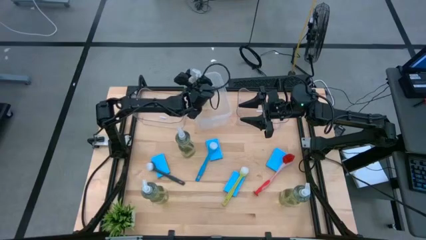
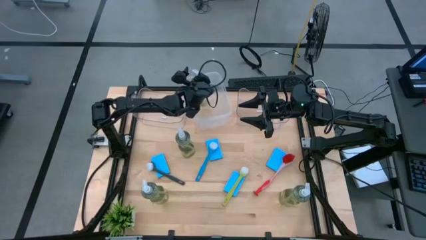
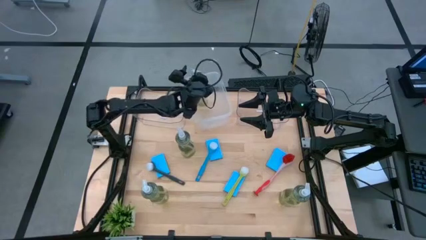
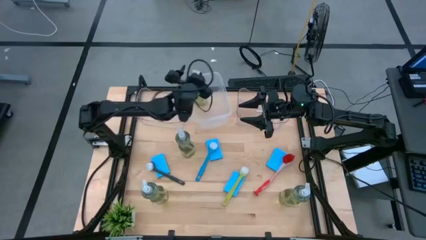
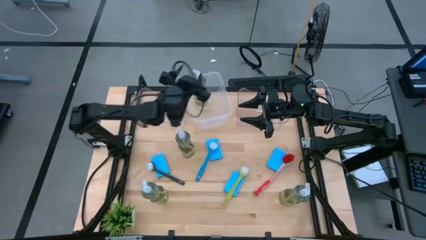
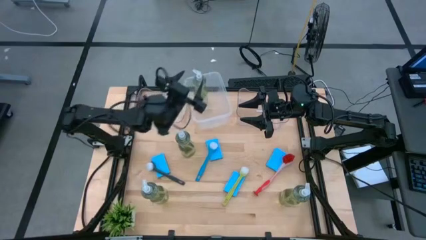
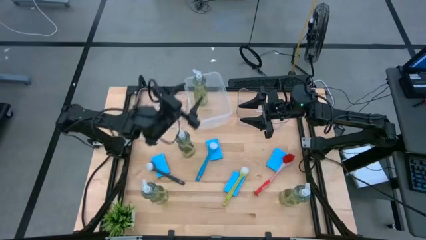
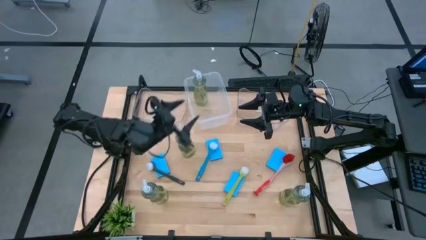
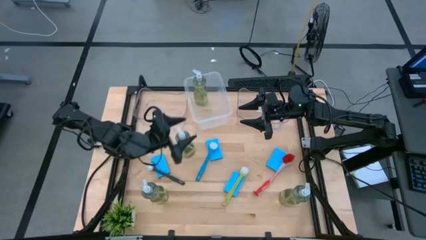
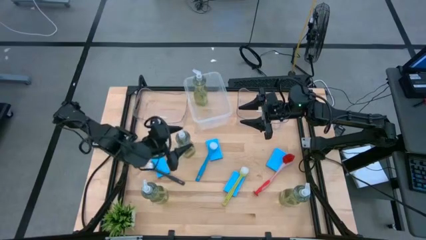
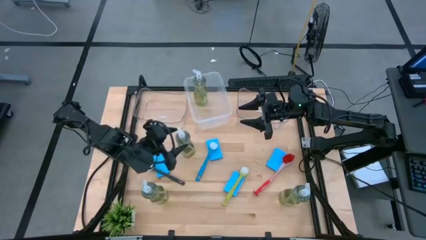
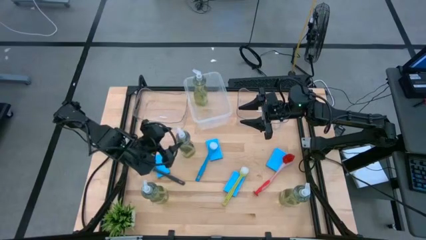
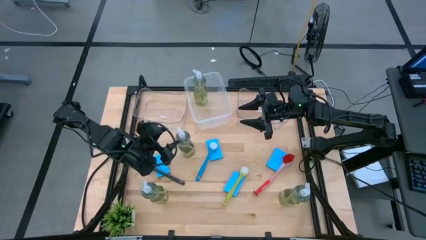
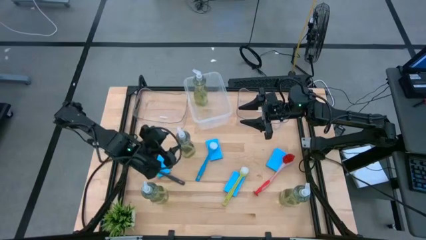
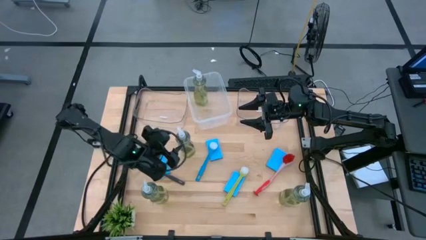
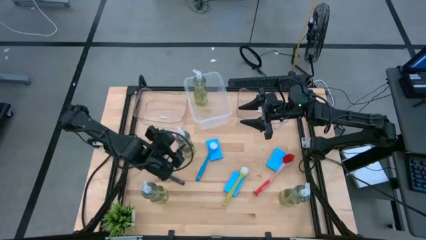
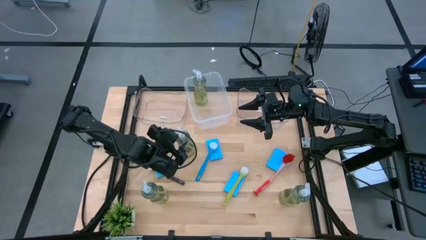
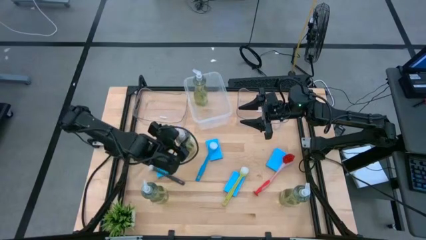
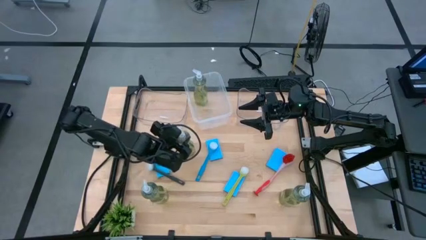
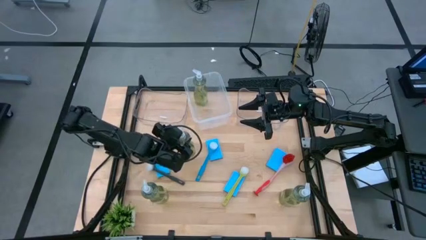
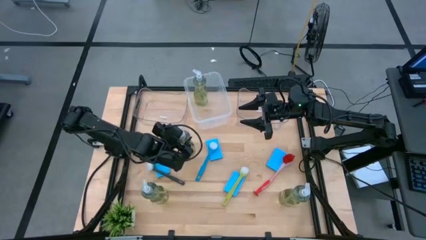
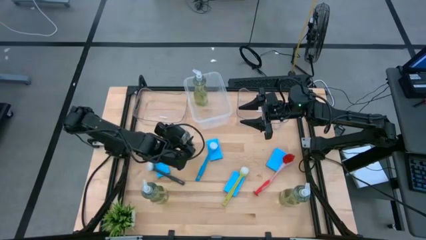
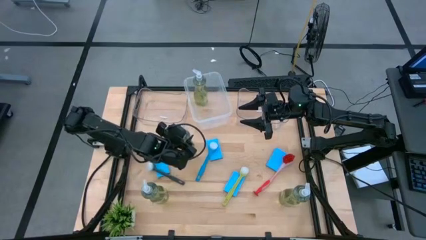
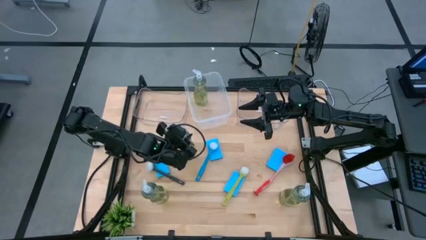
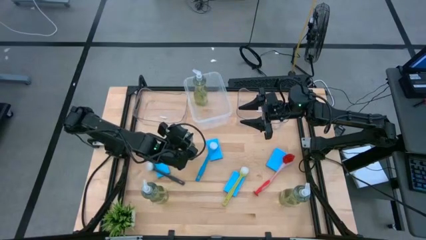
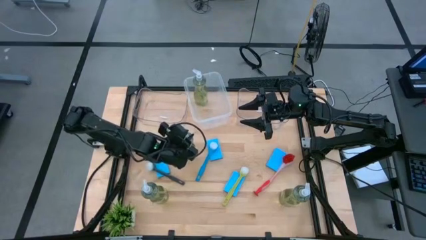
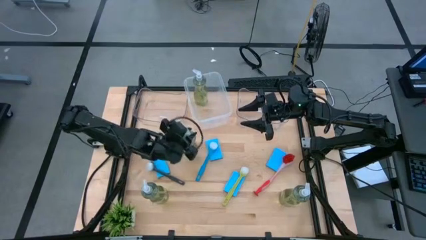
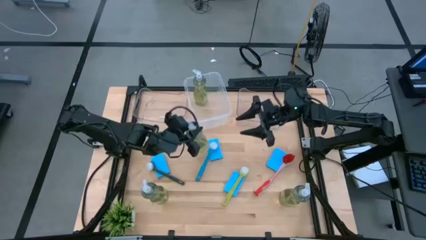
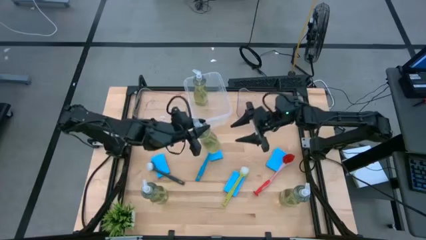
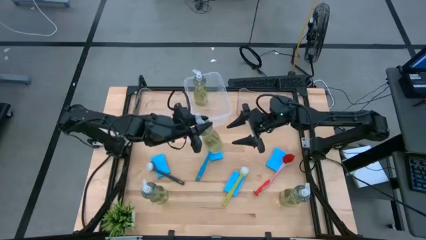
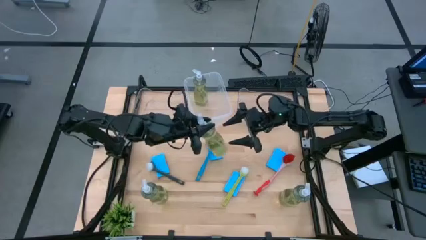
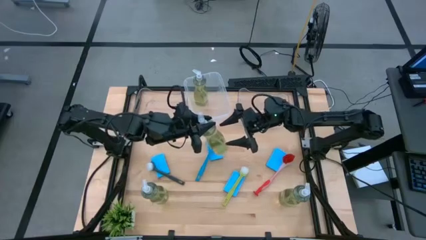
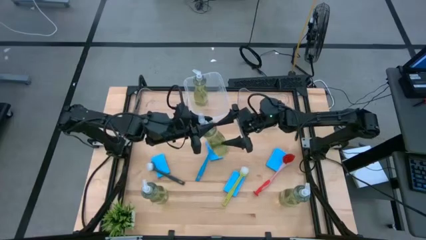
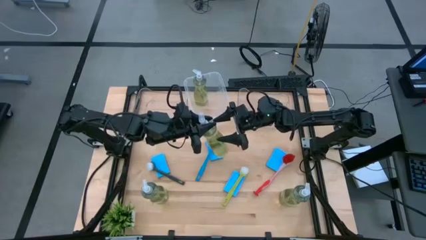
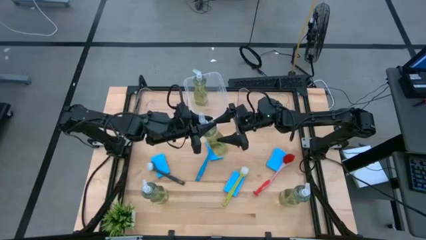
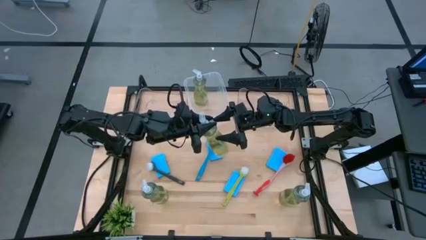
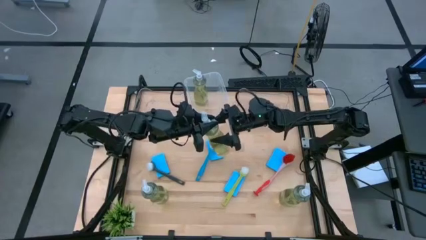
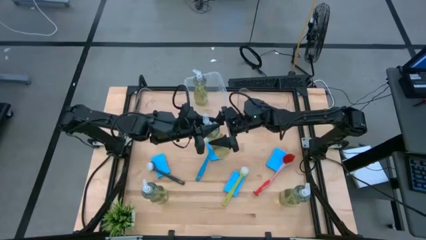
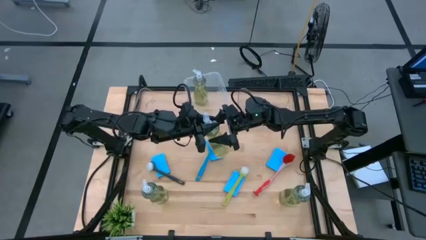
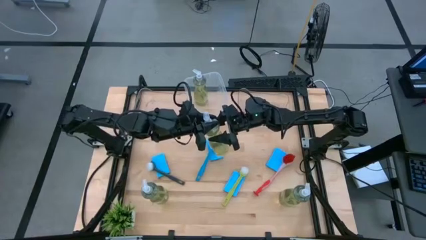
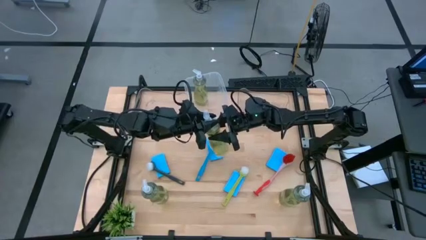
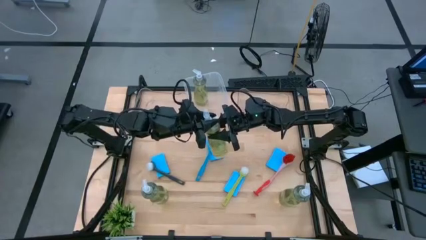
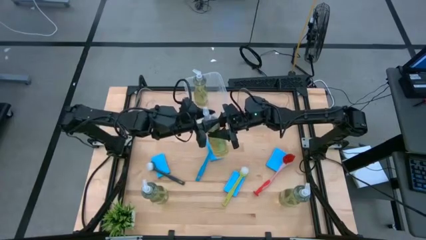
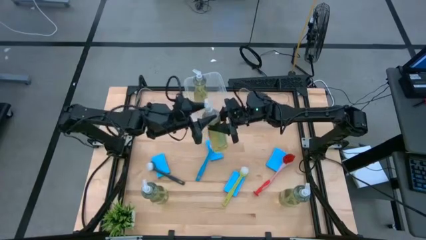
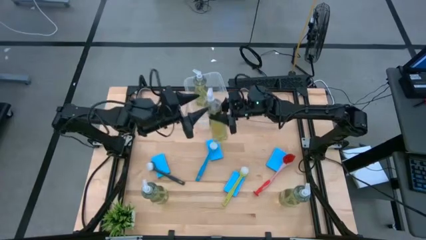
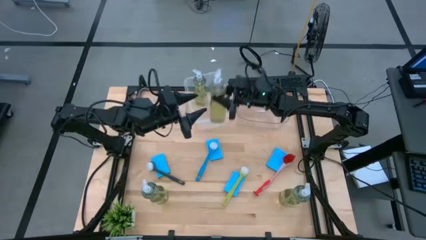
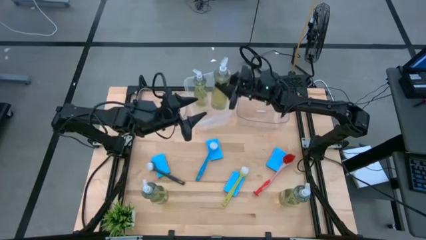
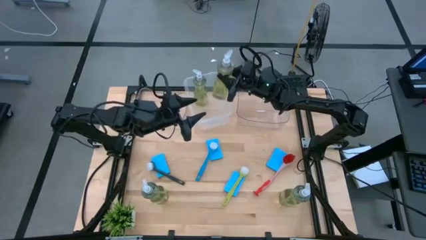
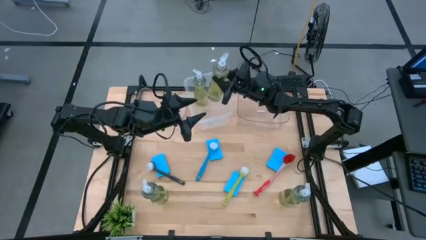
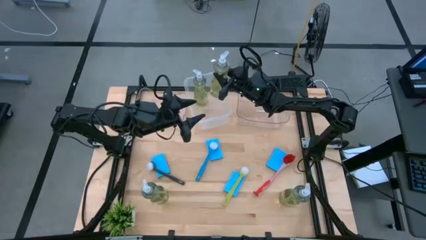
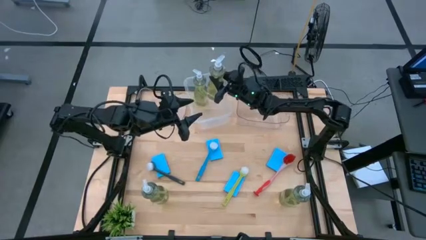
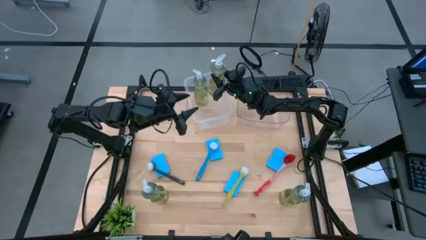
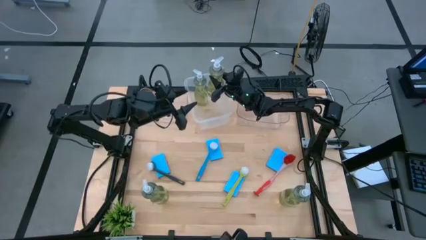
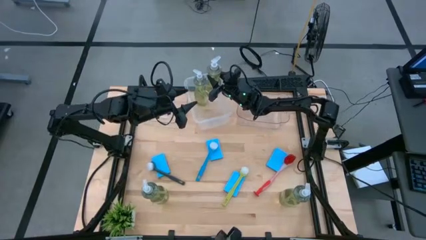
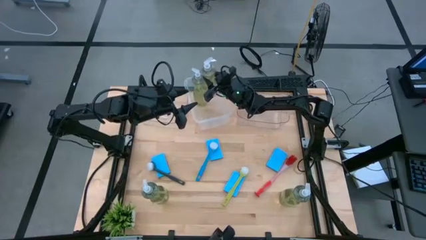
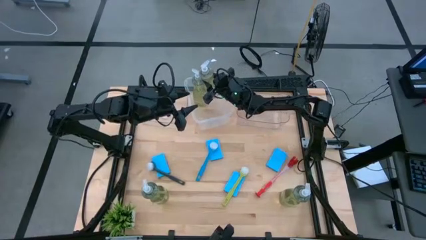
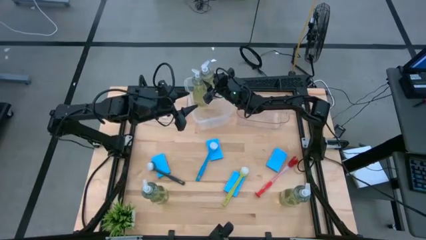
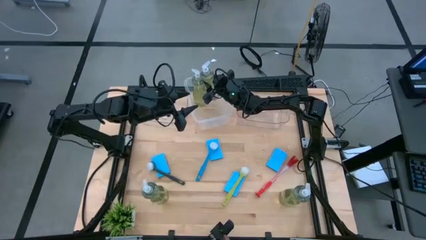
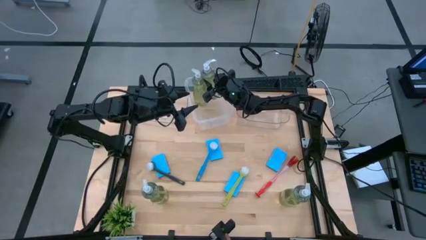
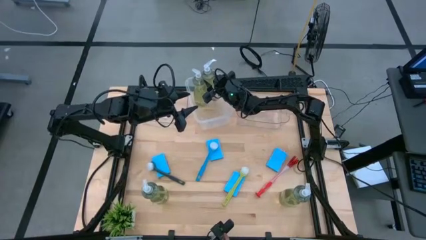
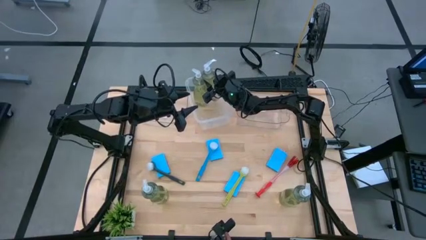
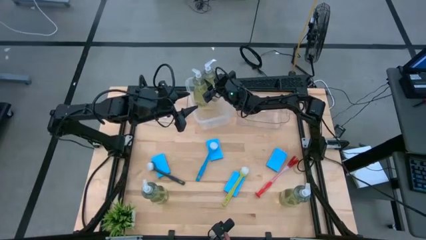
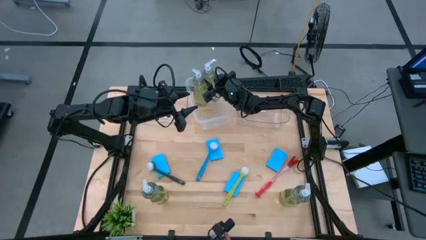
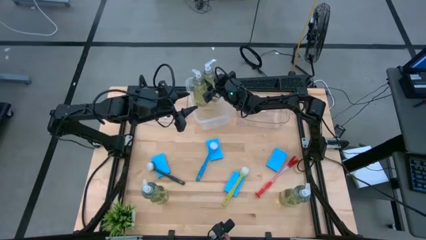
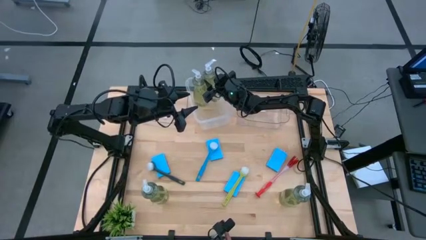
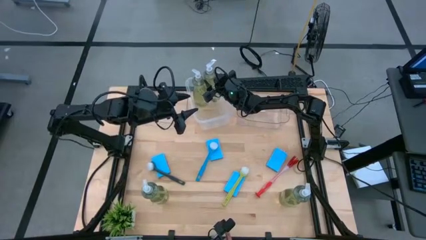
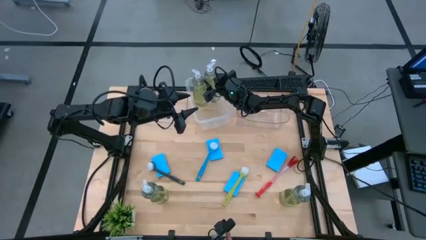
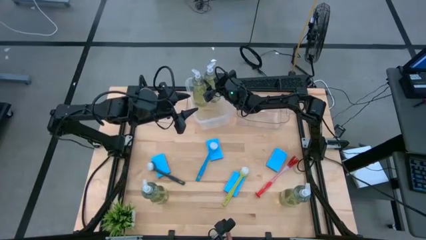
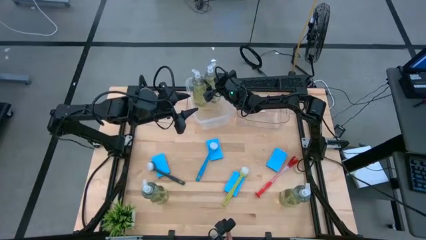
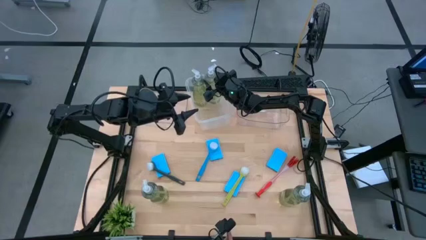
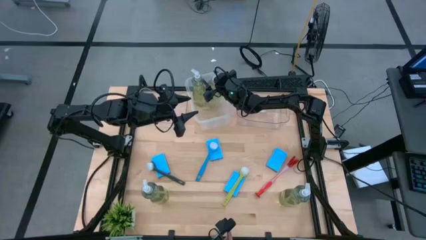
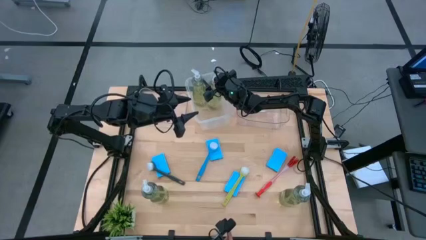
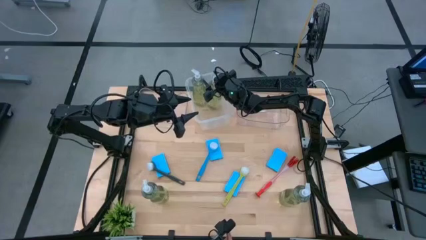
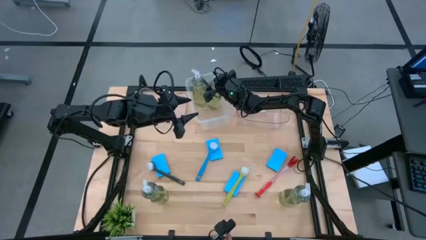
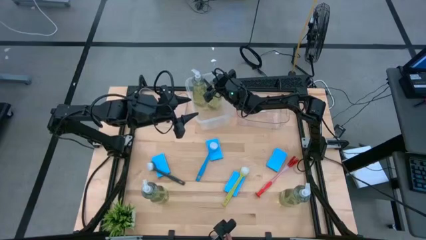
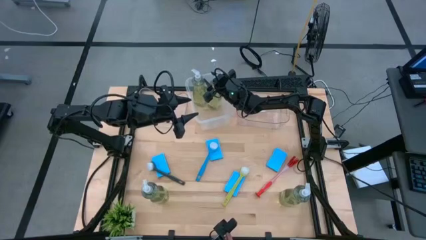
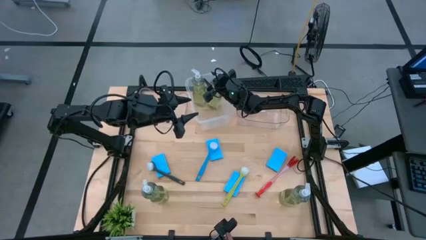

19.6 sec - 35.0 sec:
Task: Pick & Place Kitchen Sink Supplies
Put the dishwashing liquid bottle into the white bin
